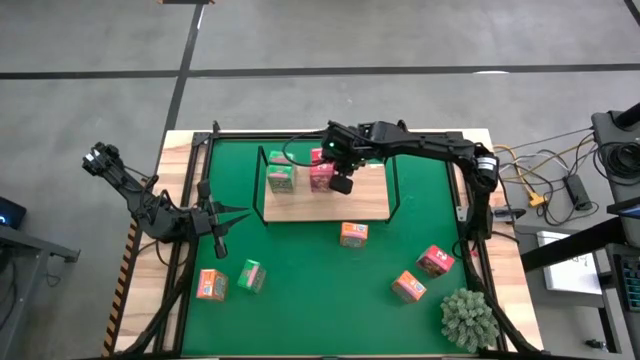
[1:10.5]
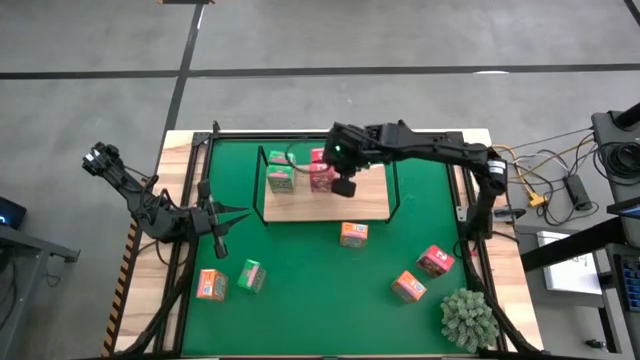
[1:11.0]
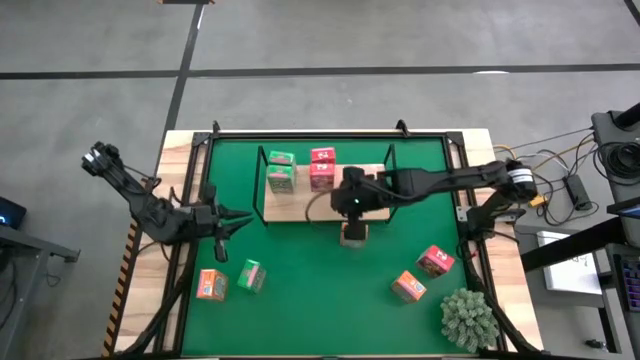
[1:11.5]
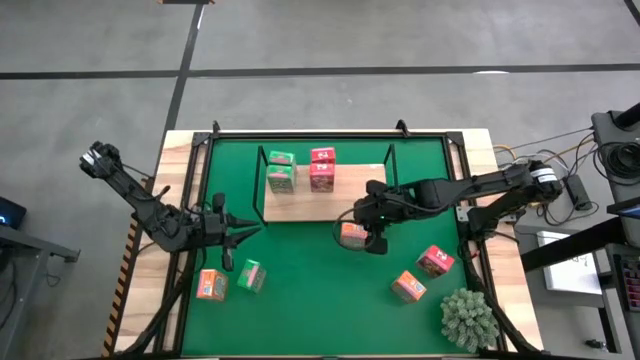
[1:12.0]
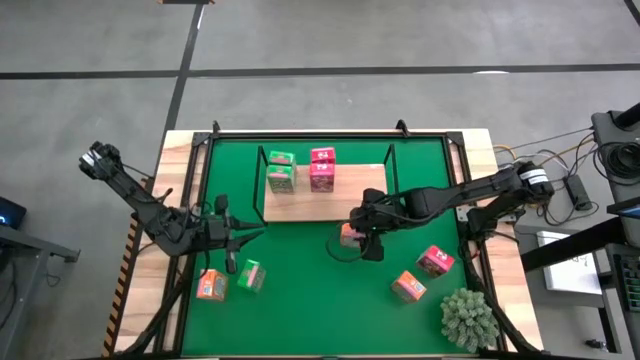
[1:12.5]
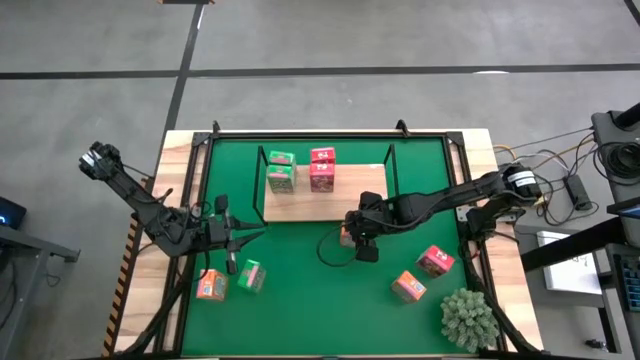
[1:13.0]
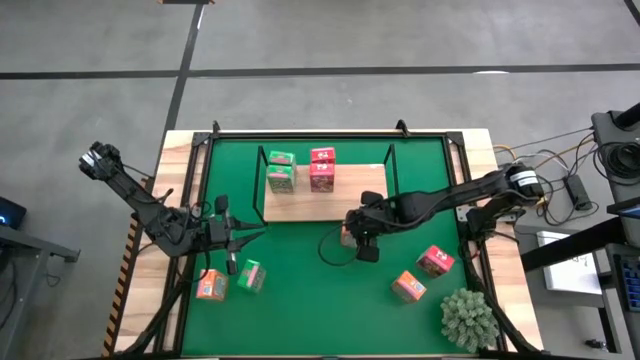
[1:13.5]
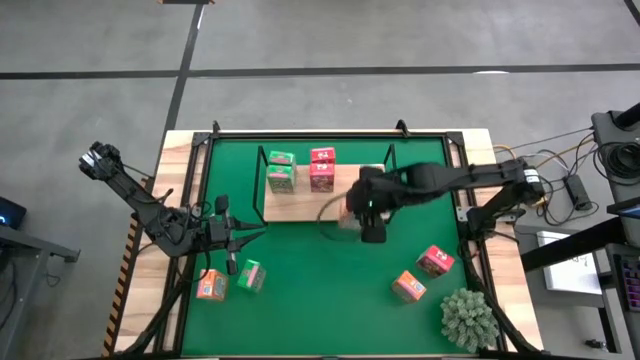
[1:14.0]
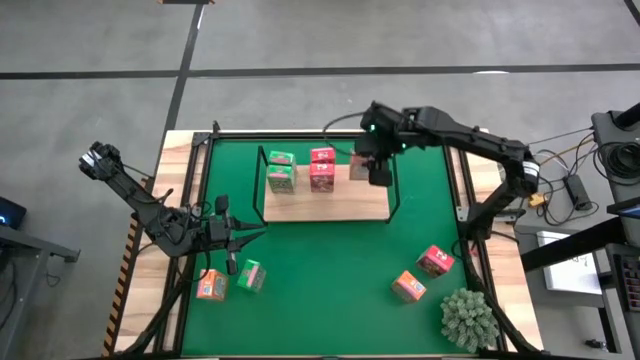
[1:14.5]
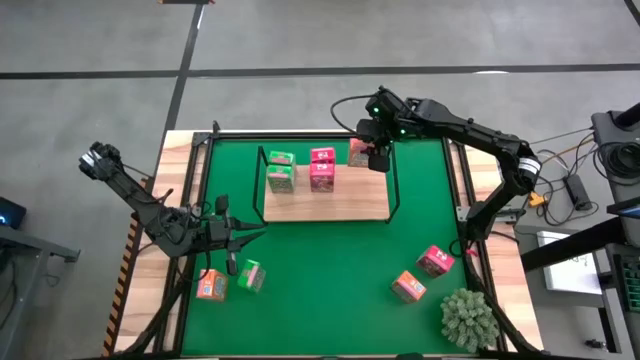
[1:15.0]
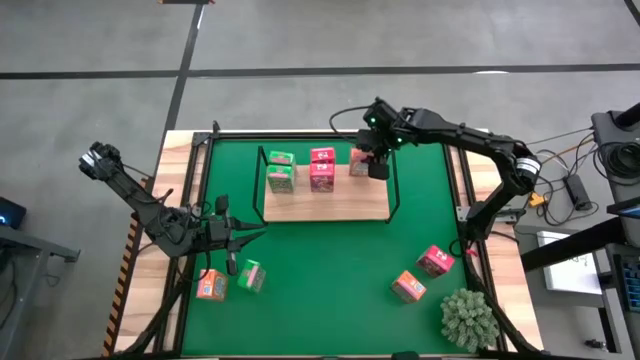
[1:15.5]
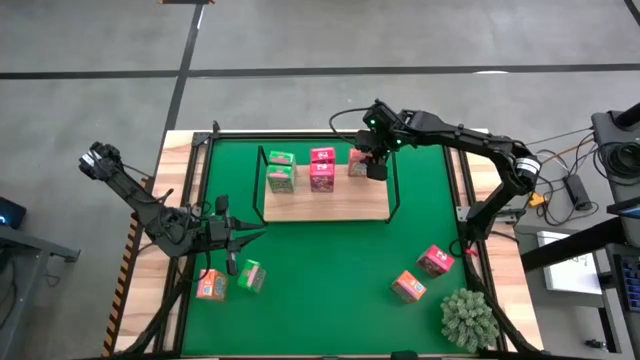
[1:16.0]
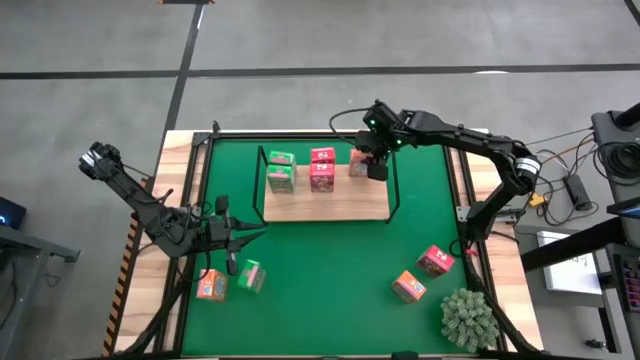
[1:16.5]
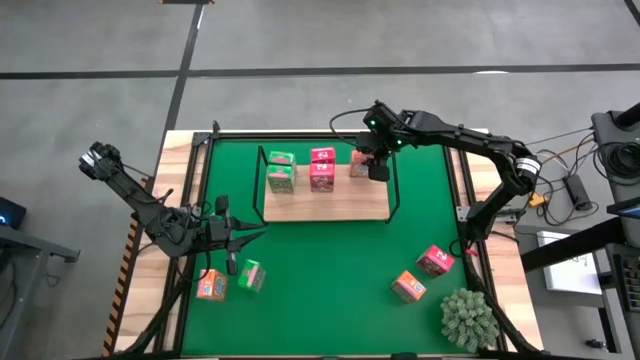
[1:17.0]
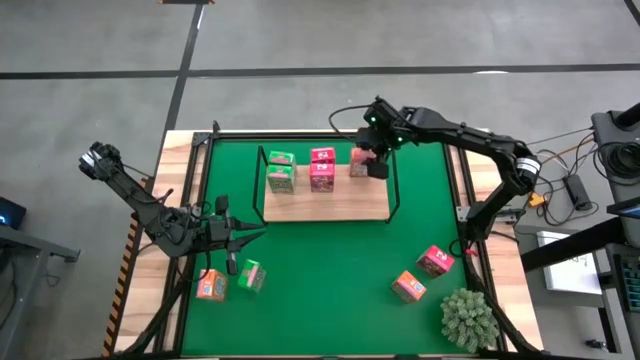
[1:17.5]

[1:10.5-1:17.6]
Task: Stack cereal on shelf
Put the top orange cereal box on the shelf

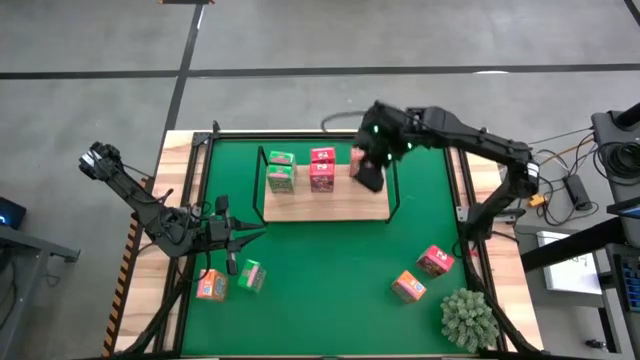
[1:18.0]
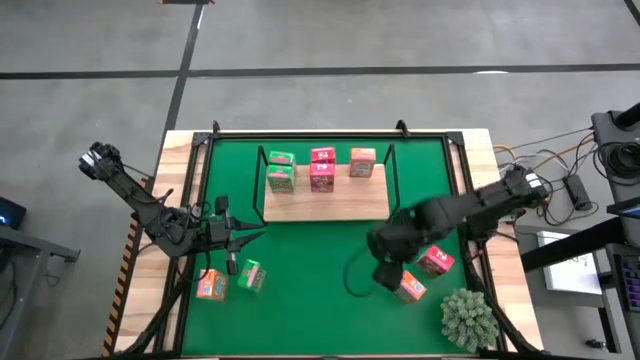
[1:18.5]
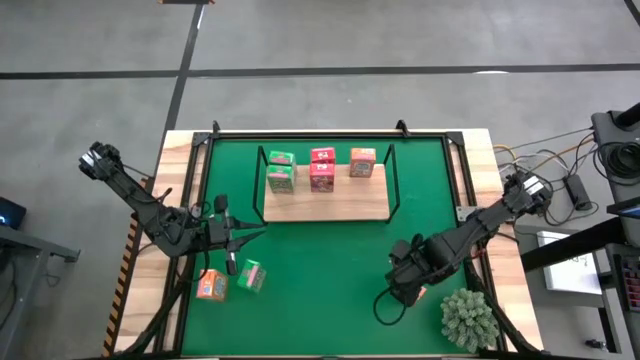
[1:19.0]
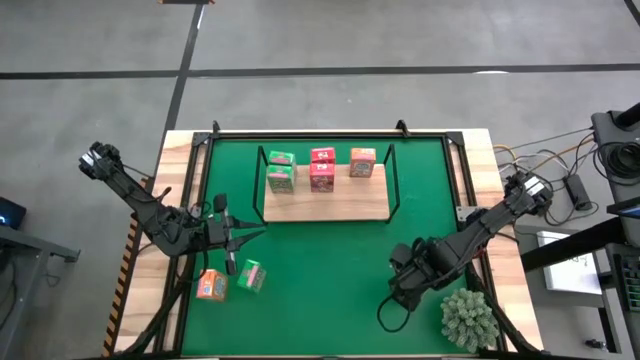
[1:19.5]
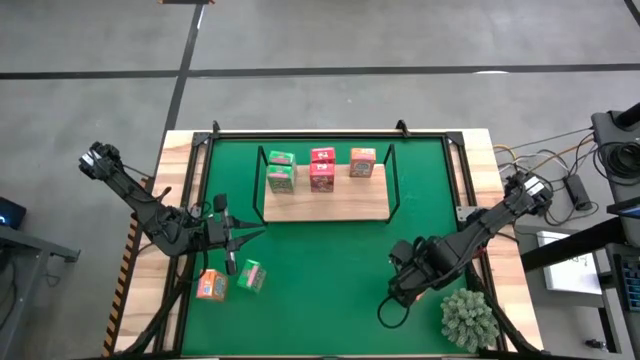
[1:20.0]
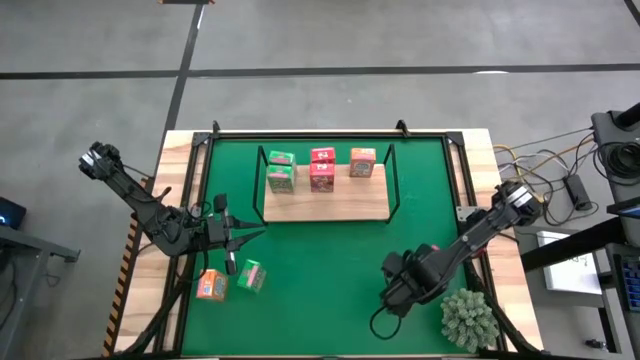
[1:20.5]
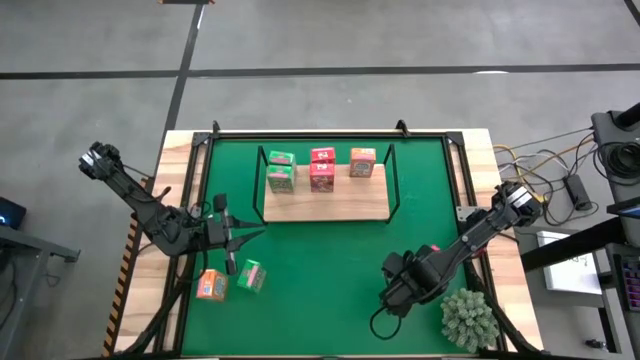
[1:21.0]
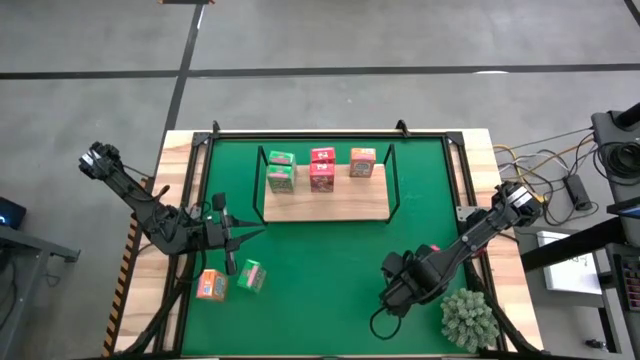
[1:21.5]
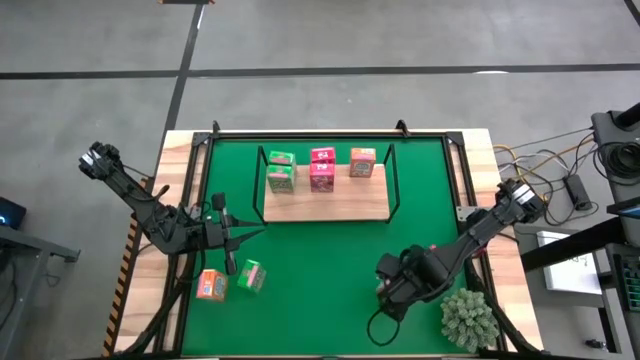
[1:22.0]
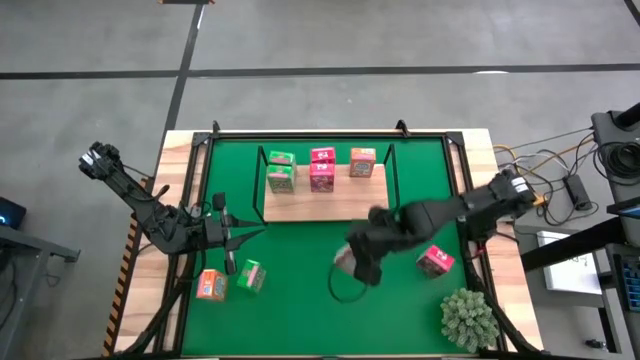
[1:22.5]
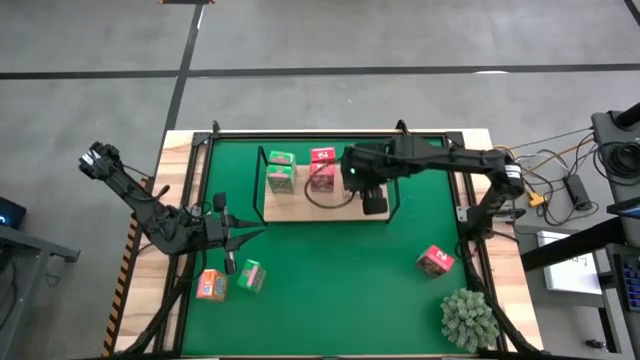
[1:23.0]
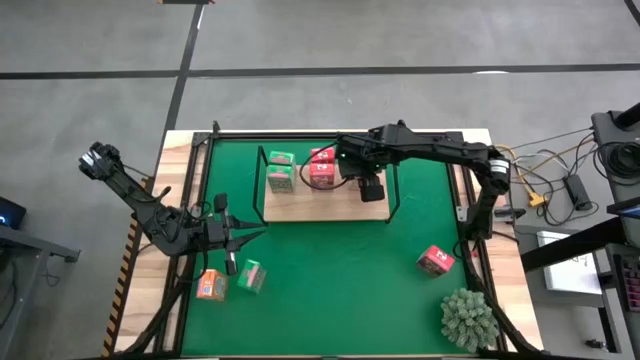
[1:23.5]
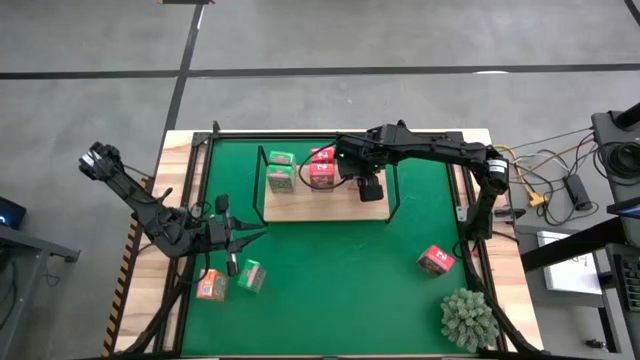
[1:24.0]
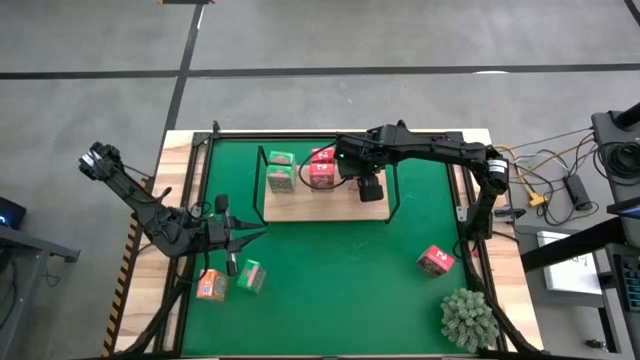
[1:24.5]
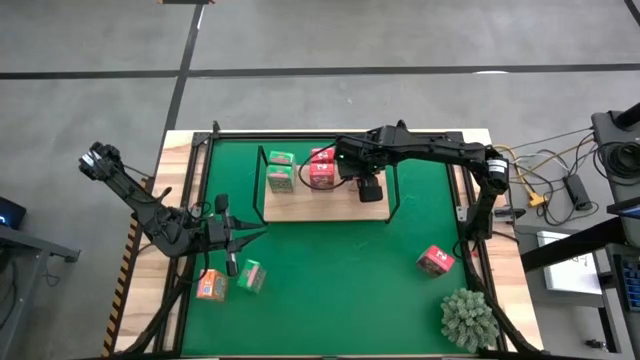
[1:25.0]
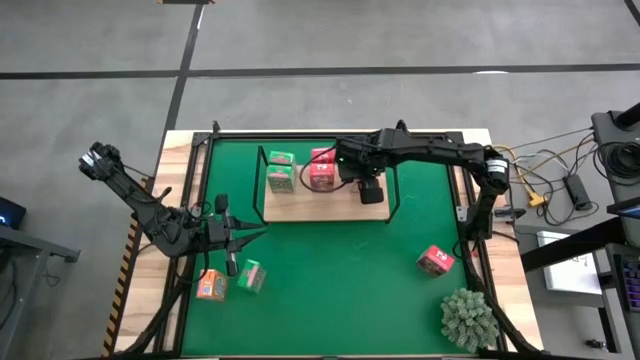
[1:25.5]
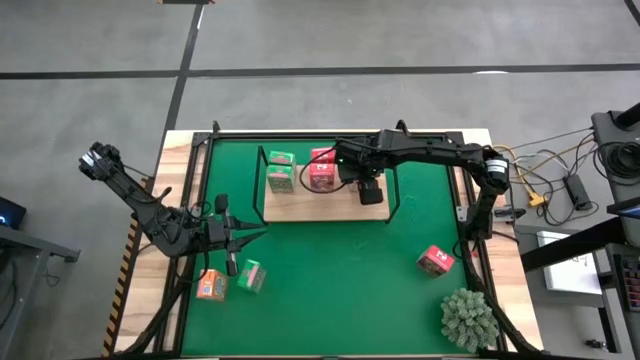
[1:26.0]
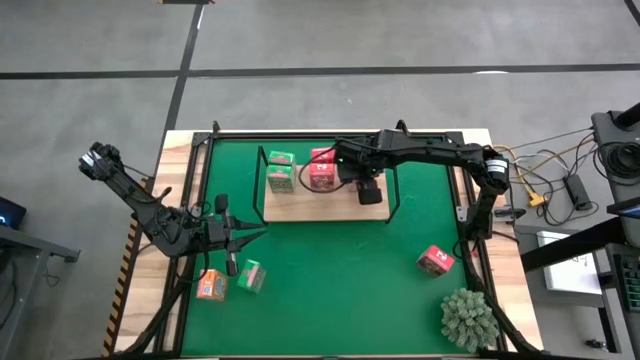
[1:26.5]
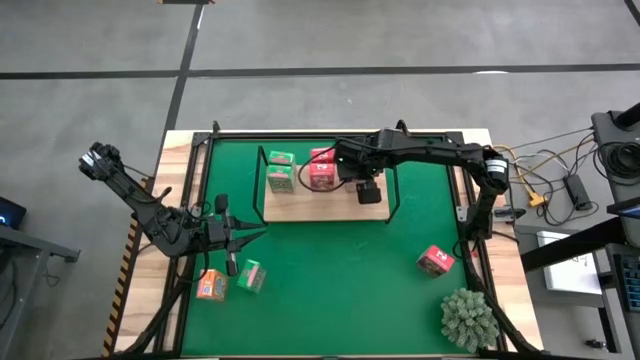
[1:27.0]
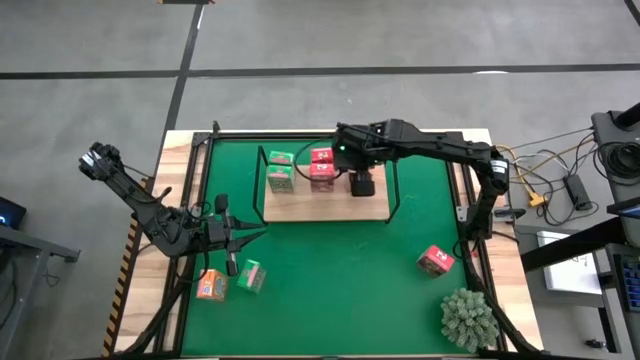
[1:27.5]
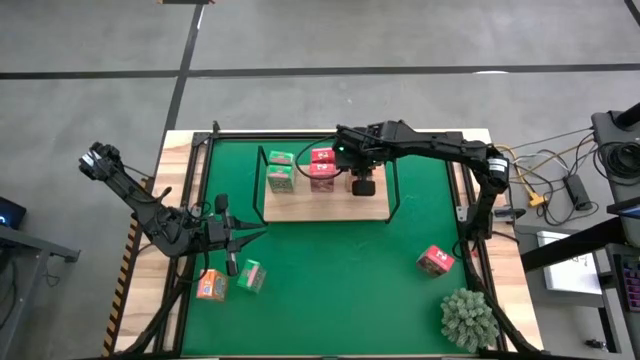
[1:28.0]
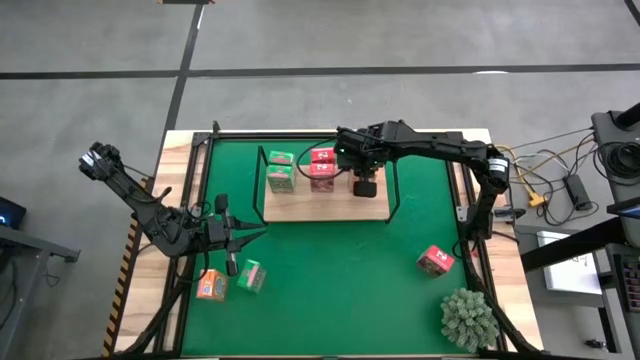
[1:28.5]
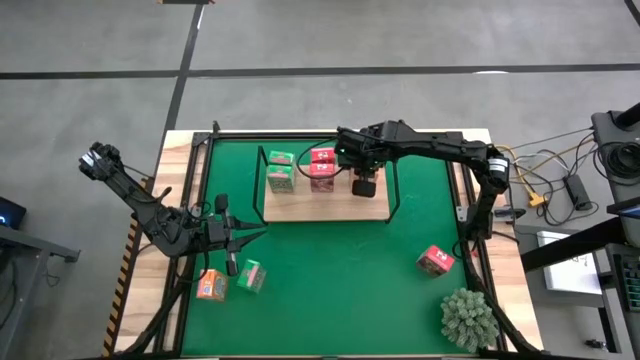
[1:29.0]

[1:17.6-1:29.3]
Put the right orange cereal box on the shelf aligned with the other orange cereal box

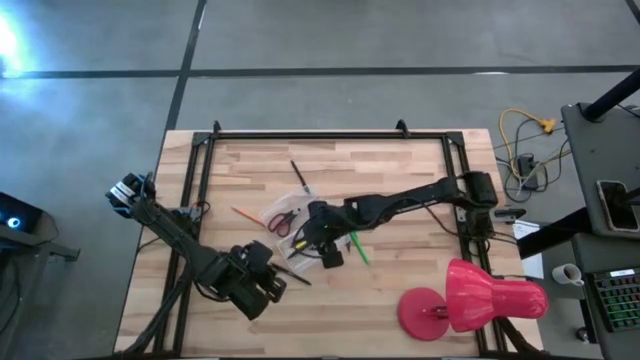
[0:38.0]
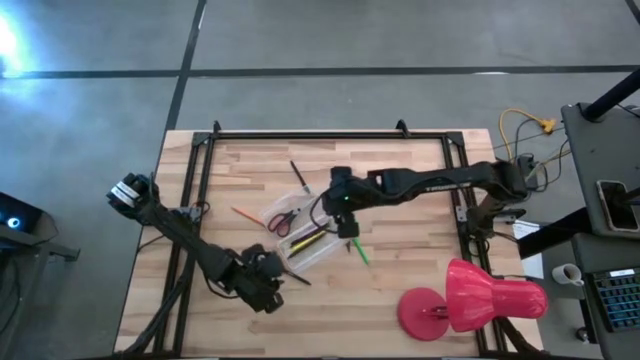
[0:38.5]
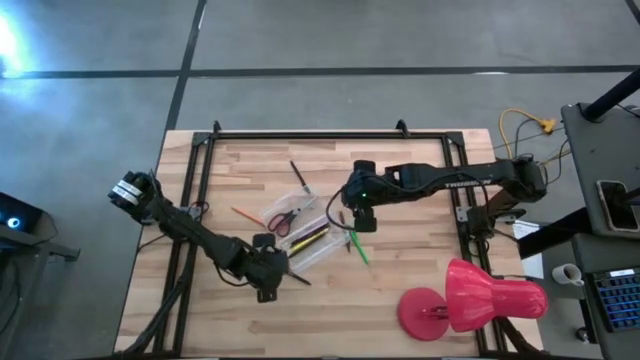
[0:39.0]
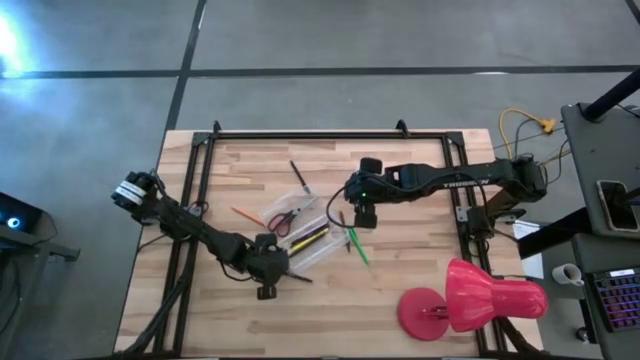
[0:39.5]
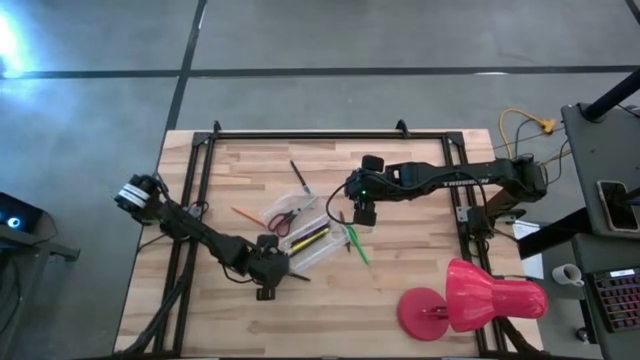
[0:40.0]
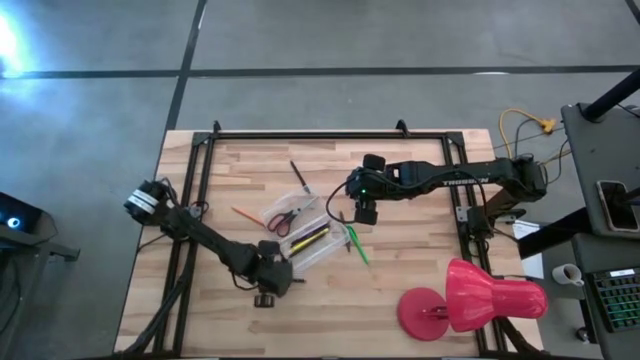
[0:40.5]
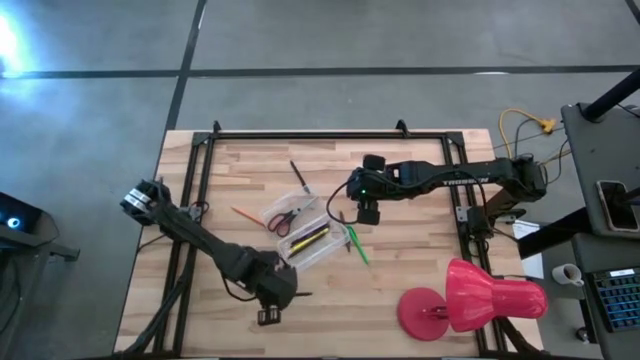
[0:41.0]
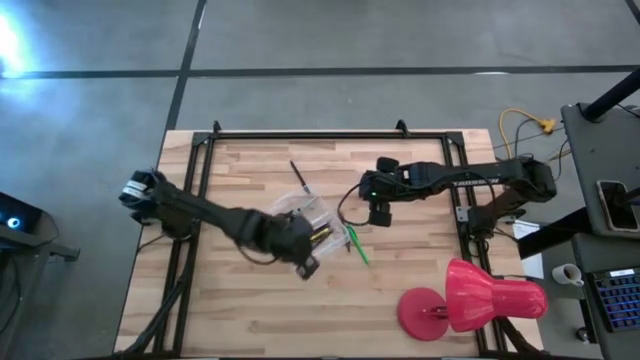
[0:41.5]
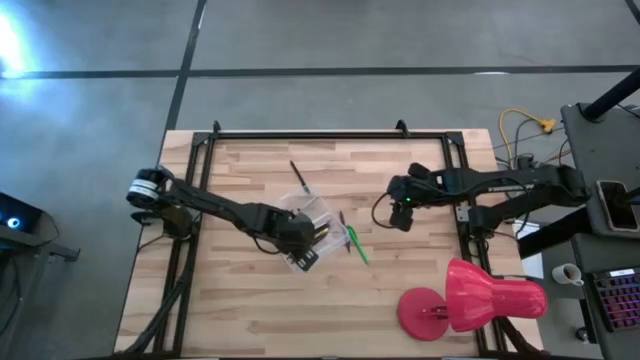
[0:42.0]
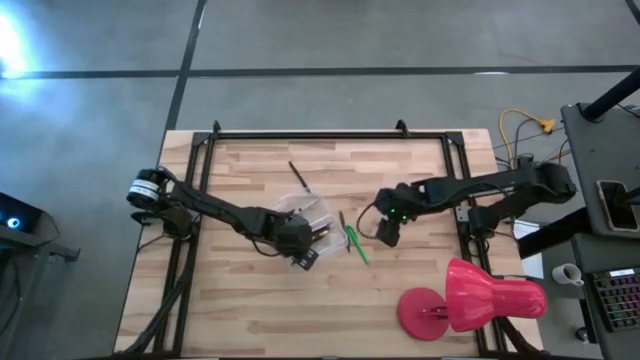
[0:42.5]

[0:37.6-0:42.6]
Task: Pick & place school supplies into a supply box
Put the bottom black pen into the stationery box
